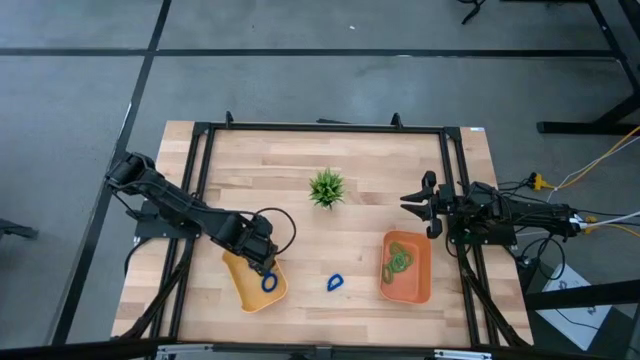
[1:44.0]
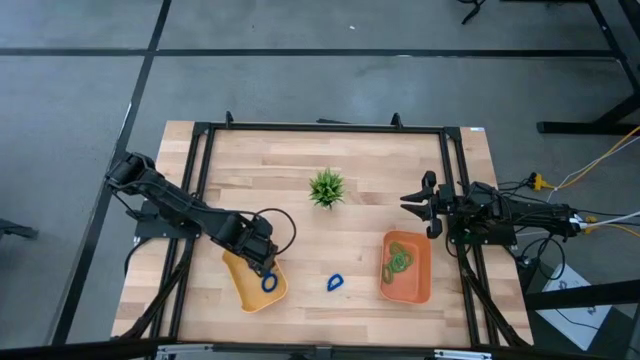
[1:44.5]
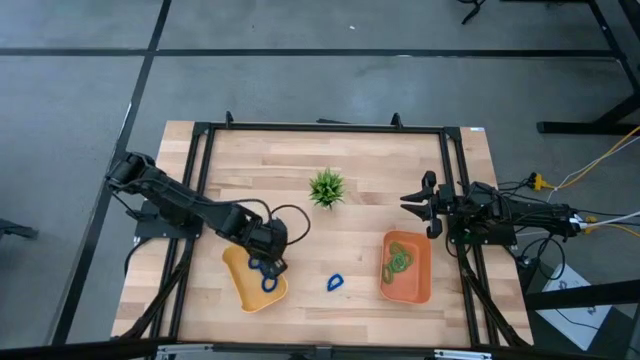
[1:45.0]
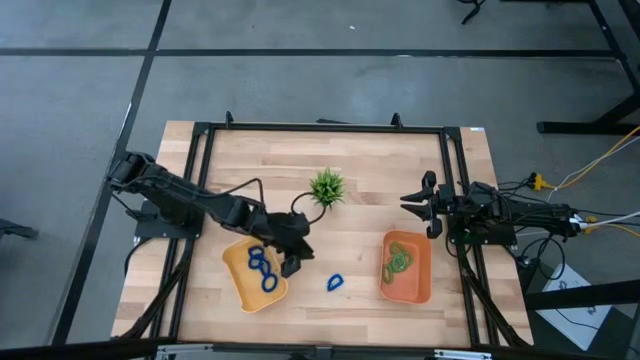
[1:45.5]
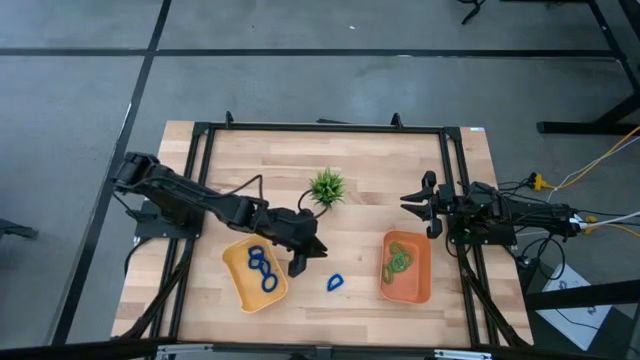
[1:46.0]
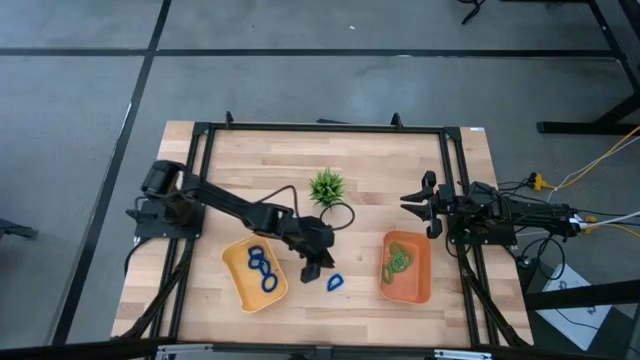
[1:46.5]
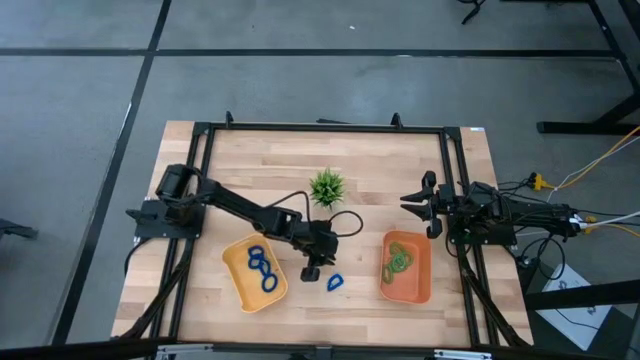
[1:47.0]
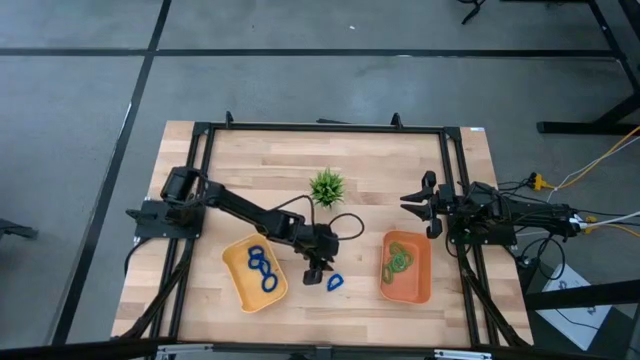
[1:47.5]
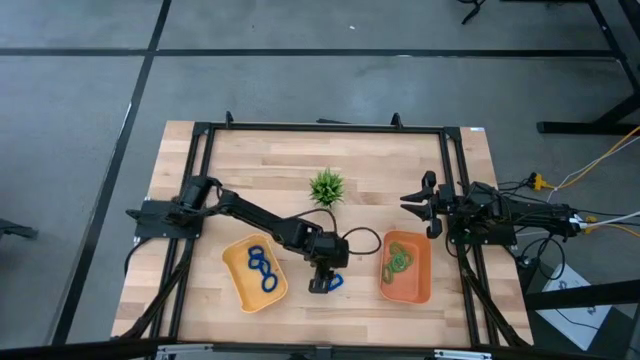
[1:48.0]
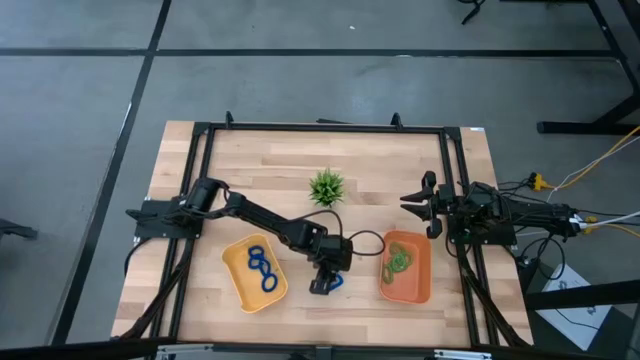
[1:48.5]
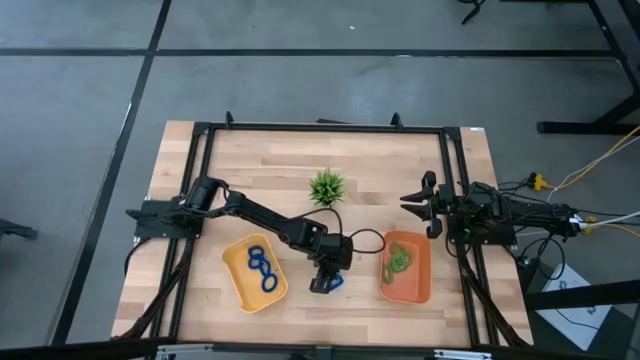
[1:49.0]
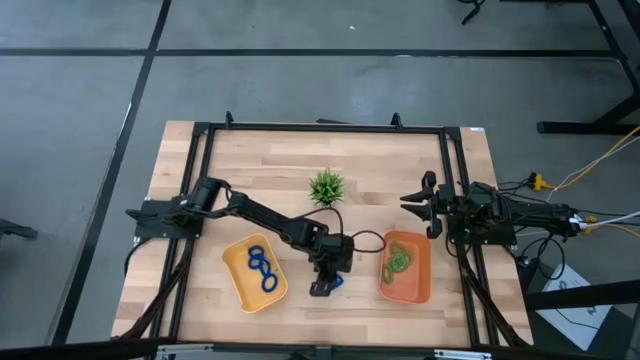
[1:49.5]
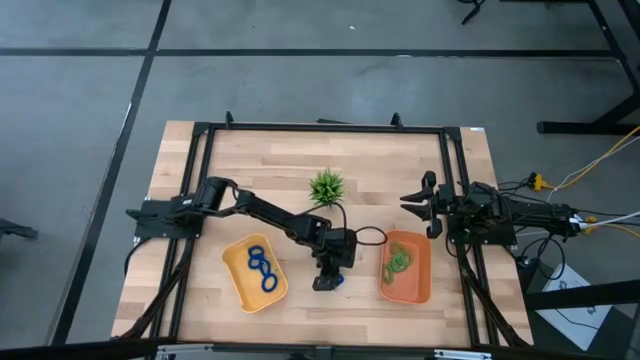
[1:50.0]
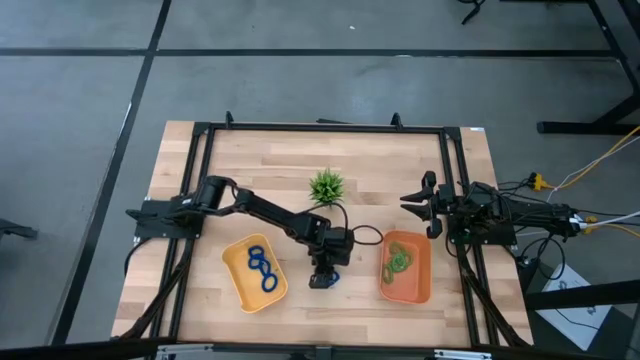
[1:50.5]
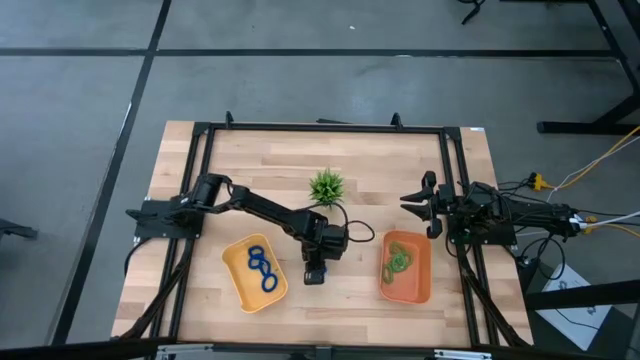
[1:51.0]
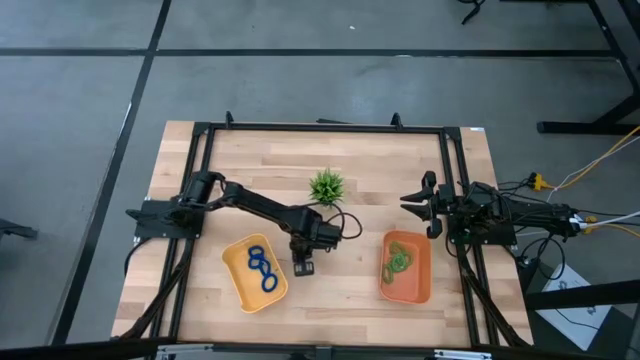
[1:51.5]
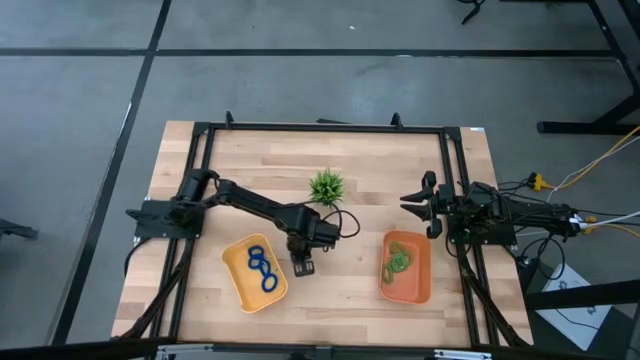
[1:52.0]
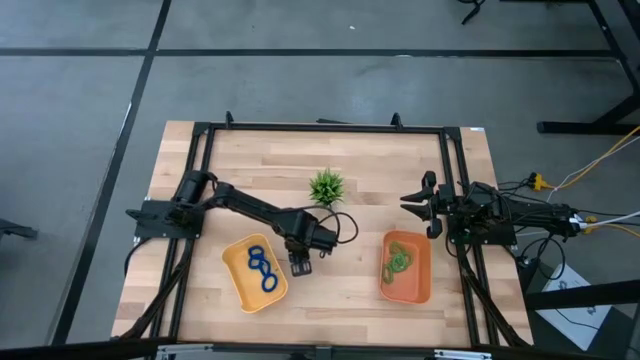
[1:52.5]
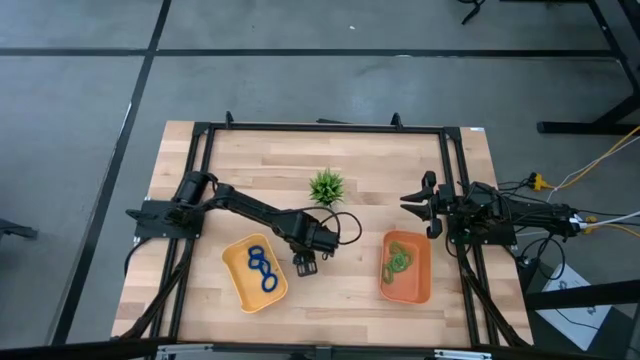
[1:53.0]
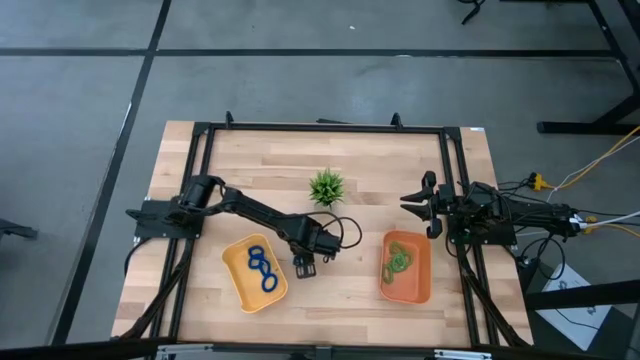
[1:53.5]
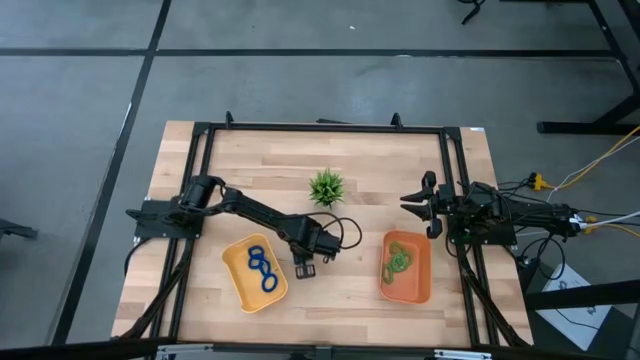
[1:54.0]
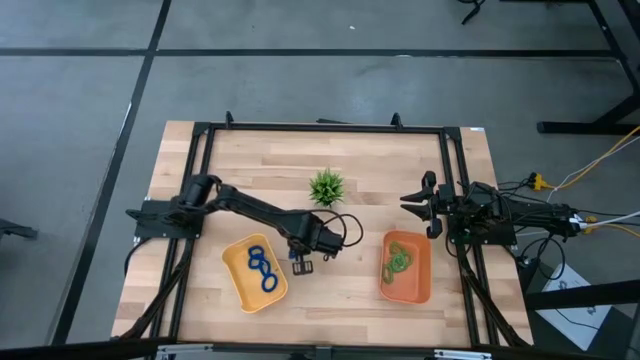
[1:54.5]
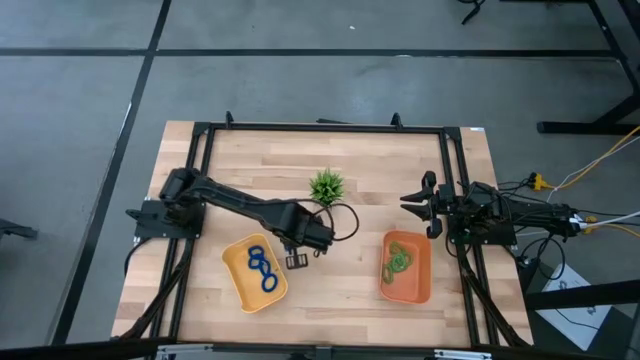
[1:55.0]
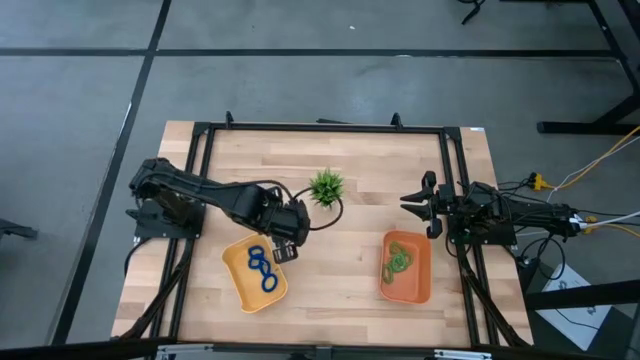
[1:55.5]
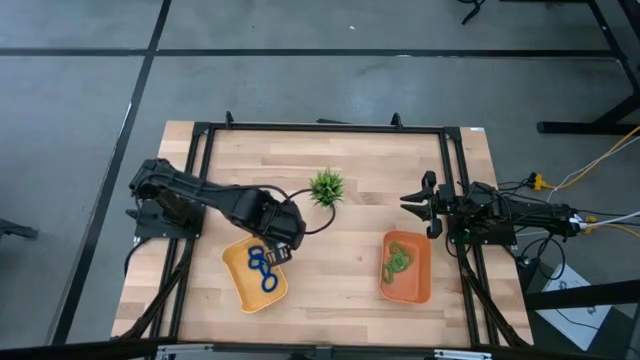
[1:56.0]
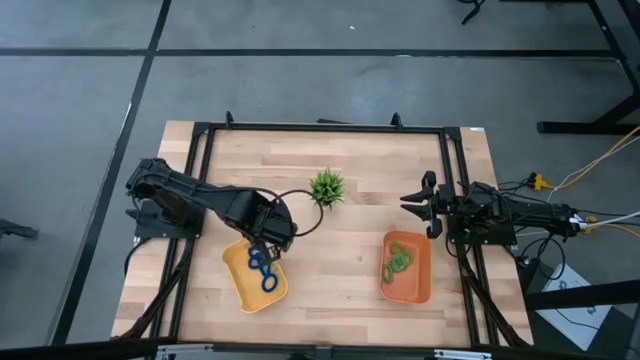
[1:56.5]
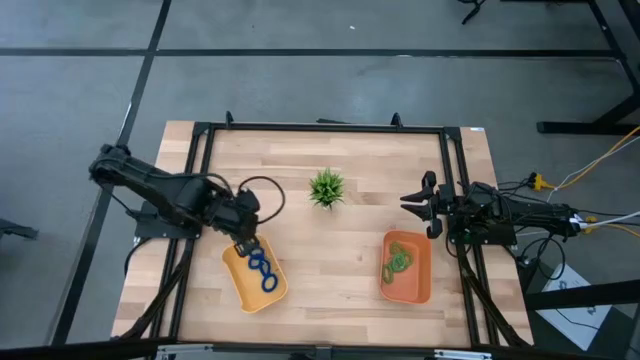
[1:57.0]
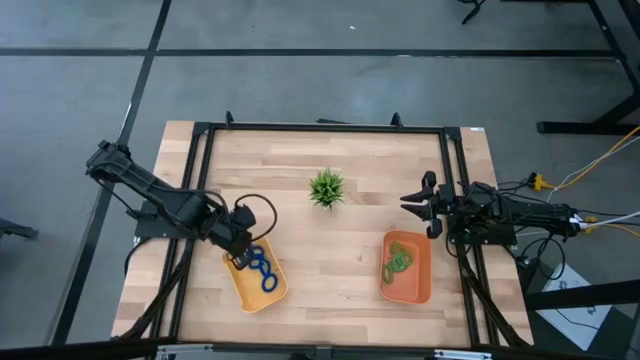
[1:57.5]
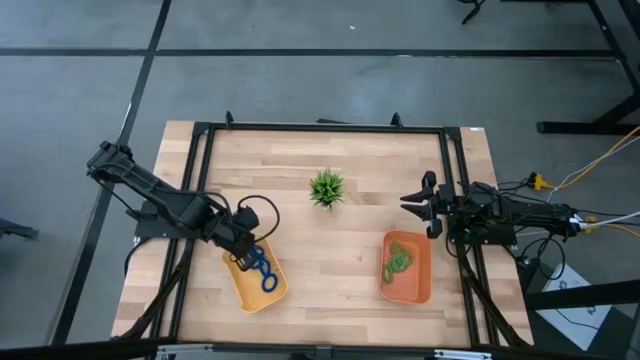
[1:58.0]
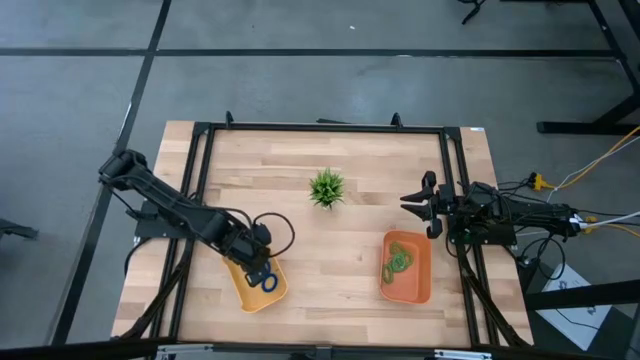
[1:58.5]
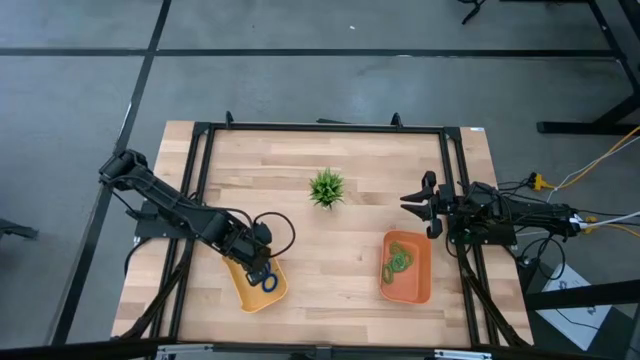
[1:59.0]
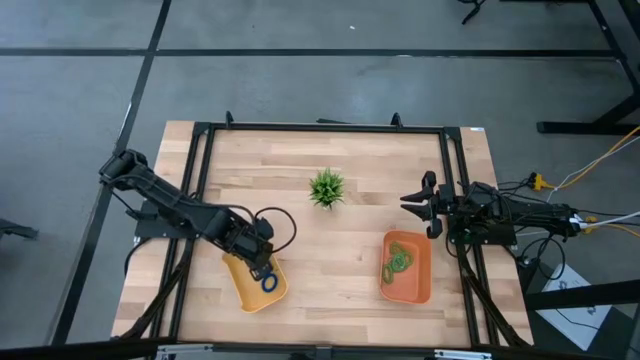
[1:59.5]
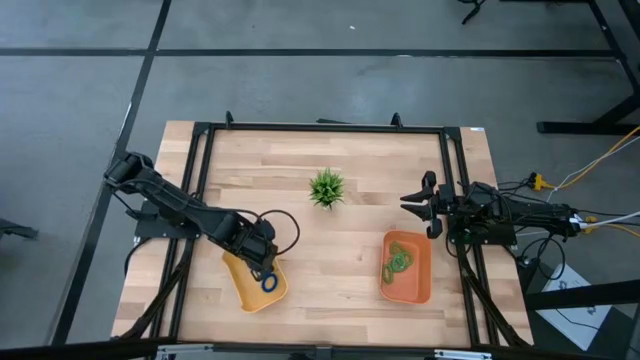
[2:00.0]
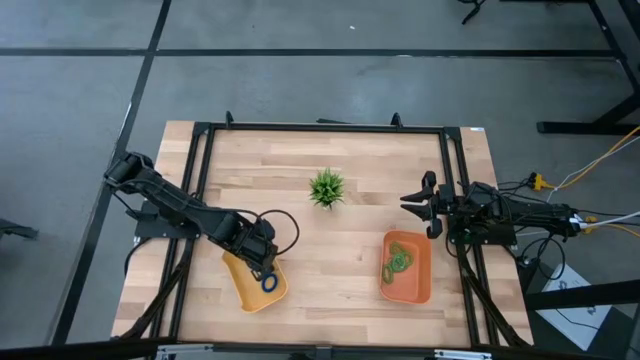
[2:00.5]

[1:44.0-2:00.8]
Task: Sort spring keychains
Put the blue spring keychain into the yellow bin

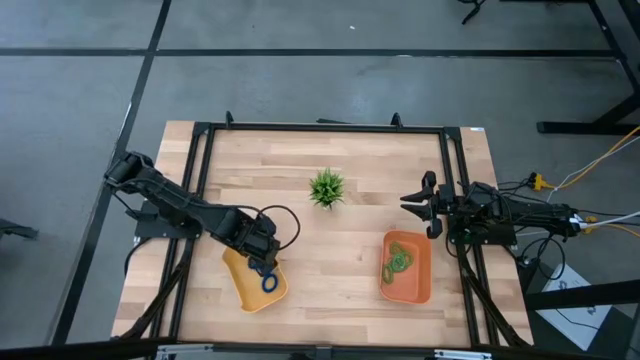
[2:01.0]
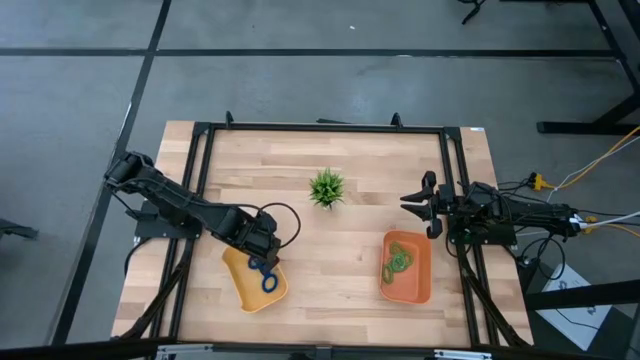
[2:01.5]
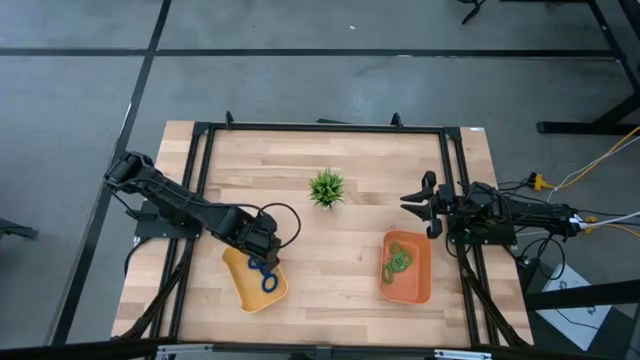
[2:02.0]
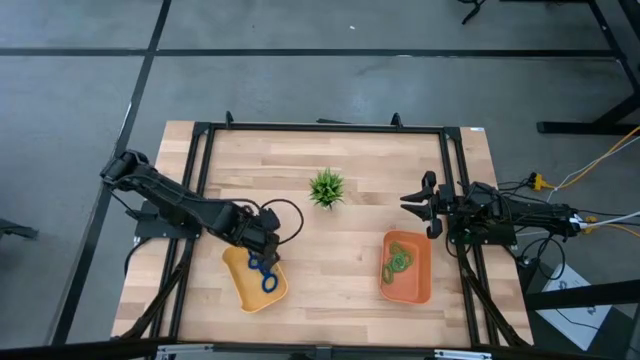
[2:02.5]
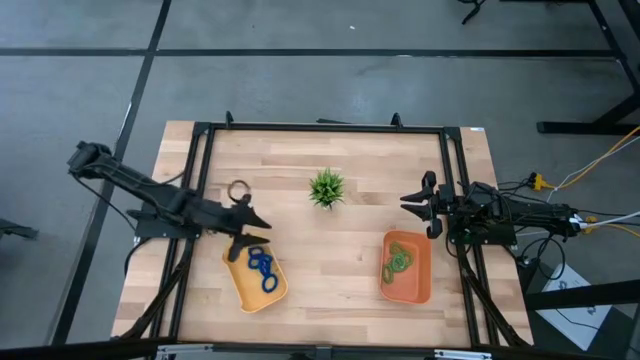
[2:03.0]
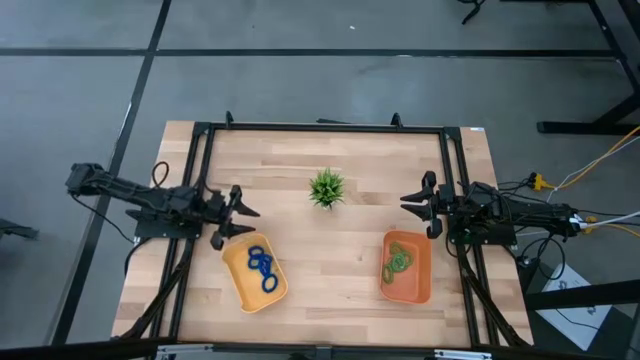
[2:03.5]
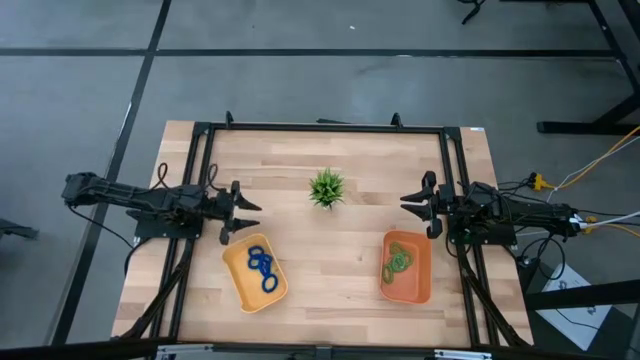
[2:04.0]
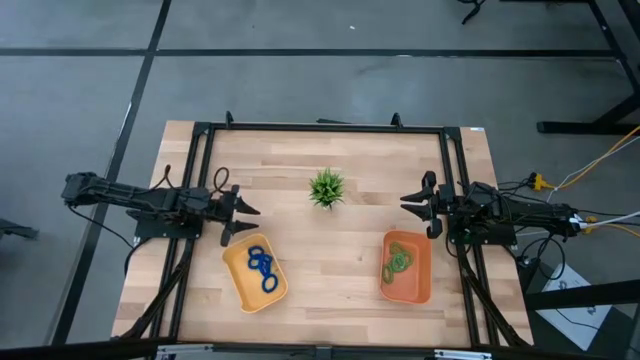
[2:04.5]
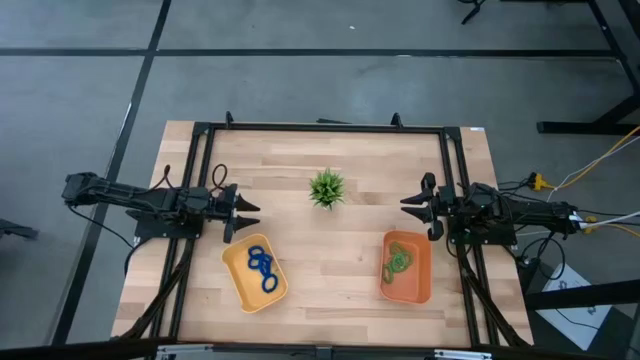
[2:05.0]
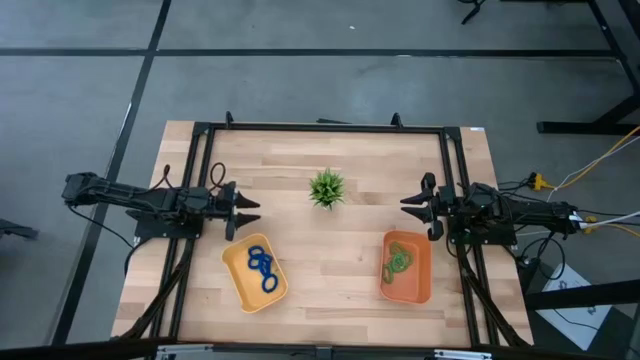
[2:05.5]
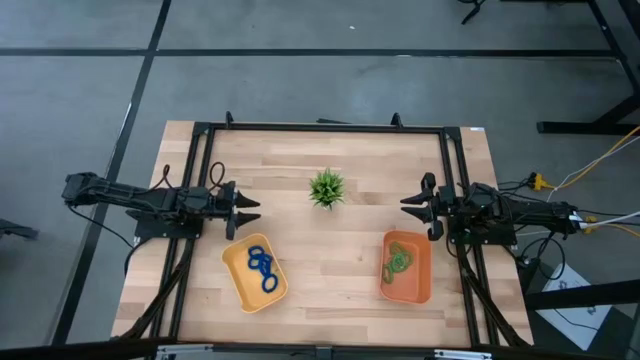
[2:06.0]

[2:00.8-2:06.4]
Return to Home Position
